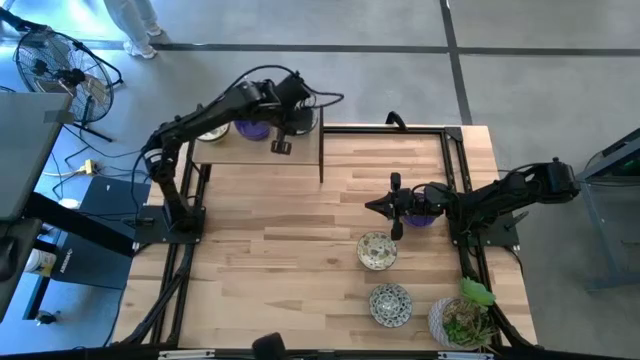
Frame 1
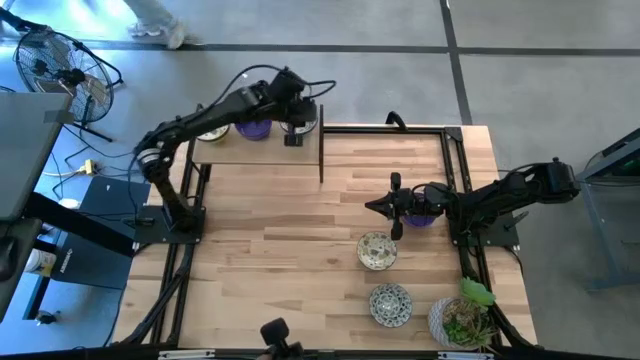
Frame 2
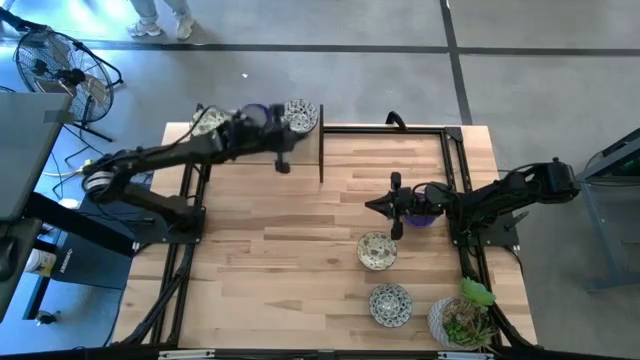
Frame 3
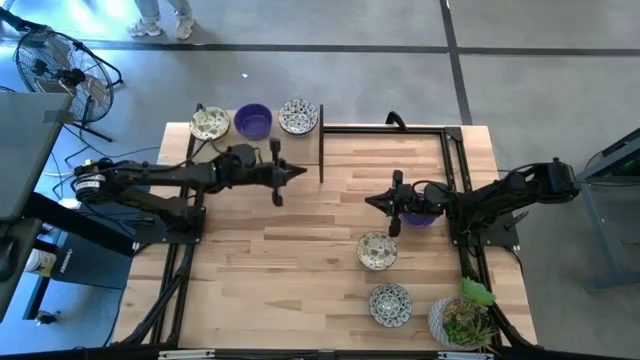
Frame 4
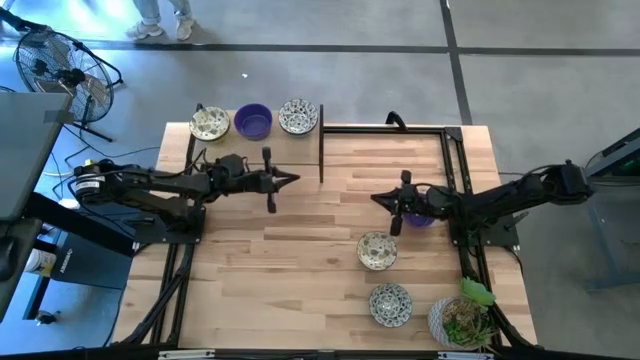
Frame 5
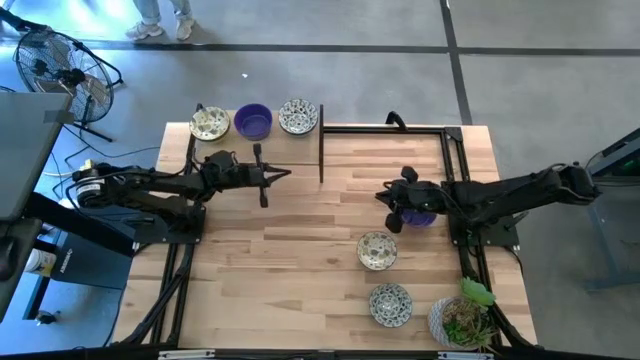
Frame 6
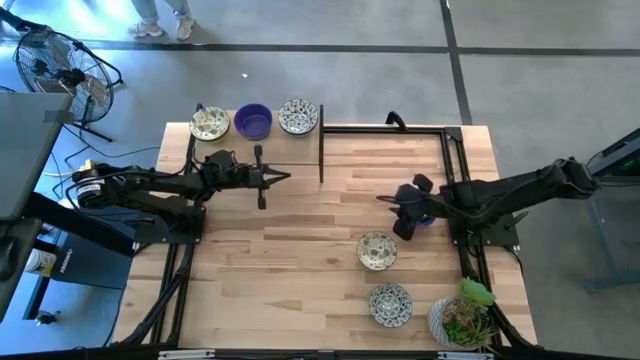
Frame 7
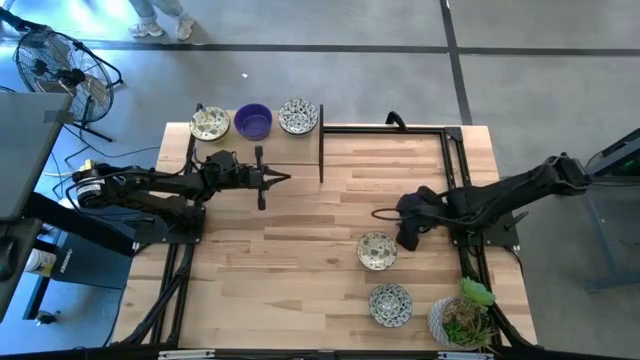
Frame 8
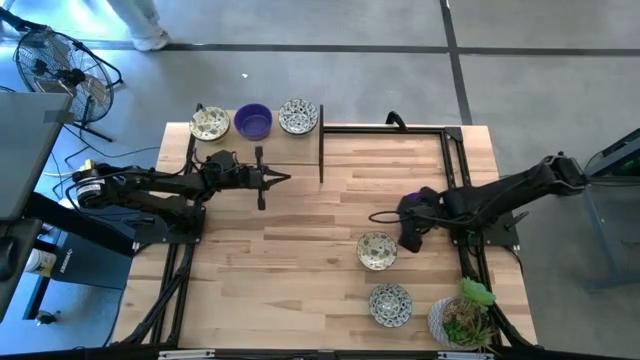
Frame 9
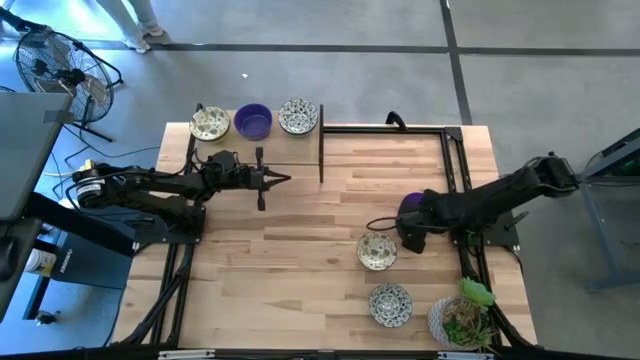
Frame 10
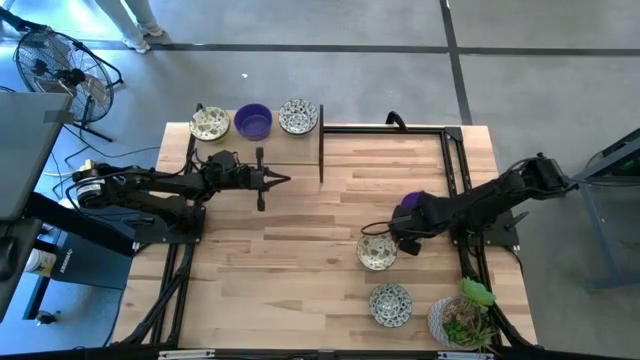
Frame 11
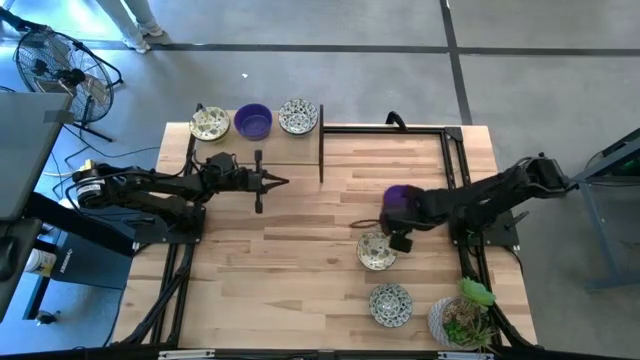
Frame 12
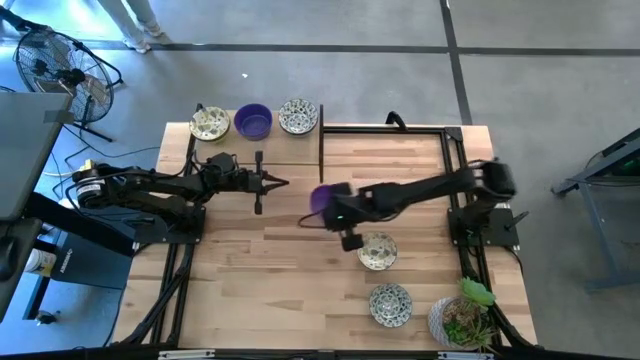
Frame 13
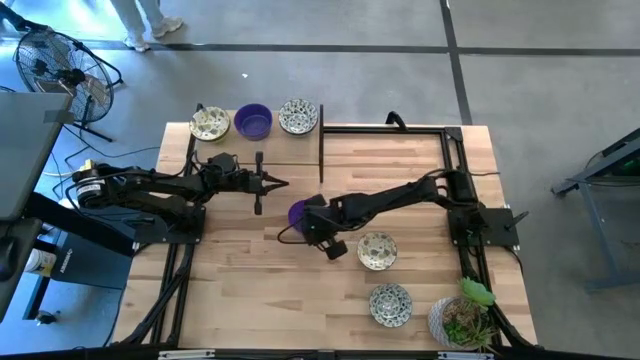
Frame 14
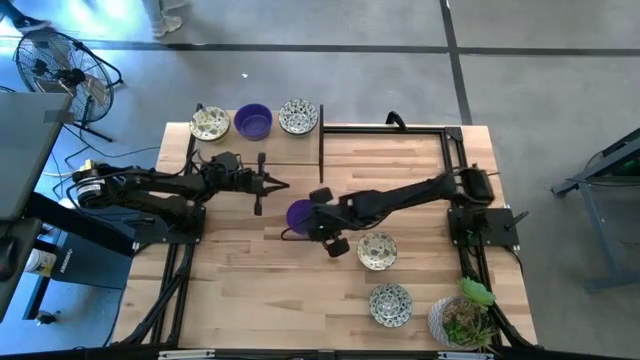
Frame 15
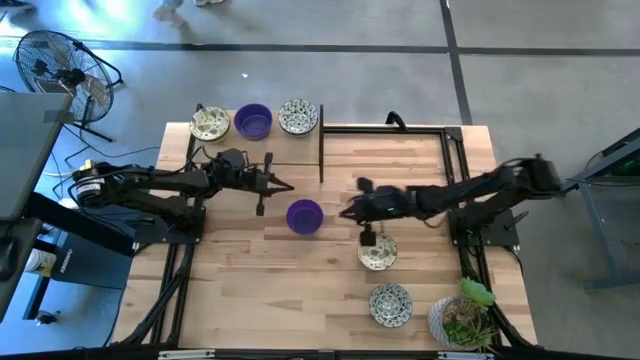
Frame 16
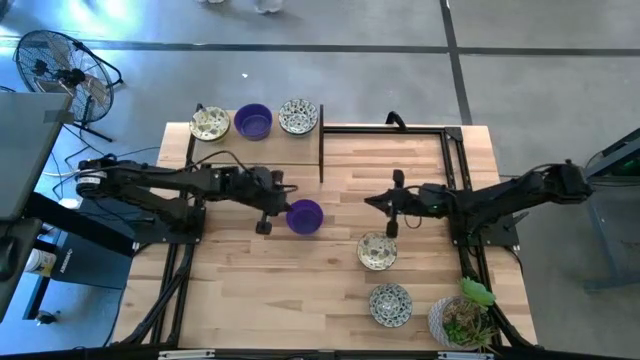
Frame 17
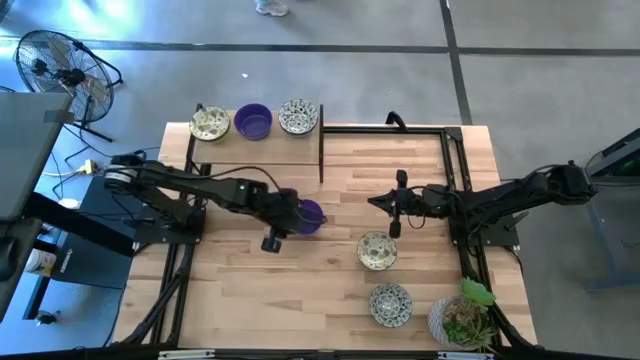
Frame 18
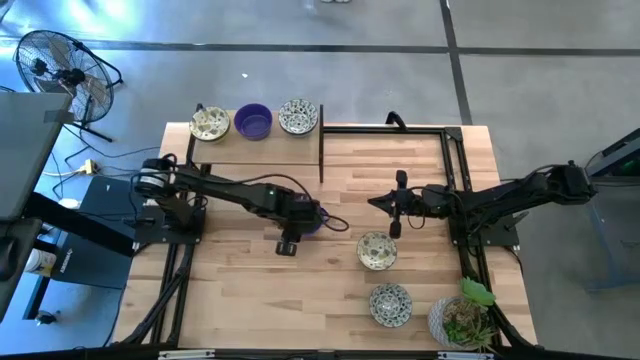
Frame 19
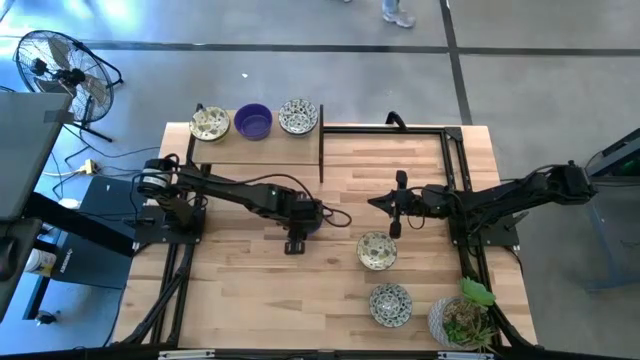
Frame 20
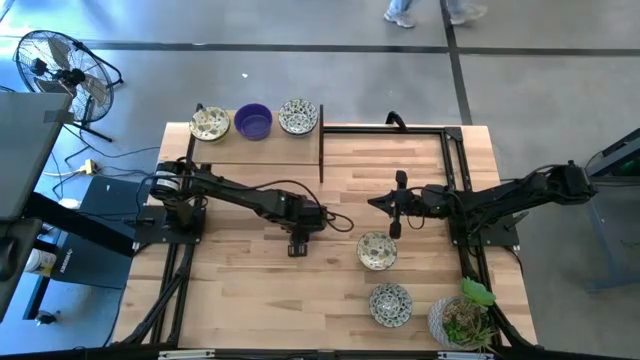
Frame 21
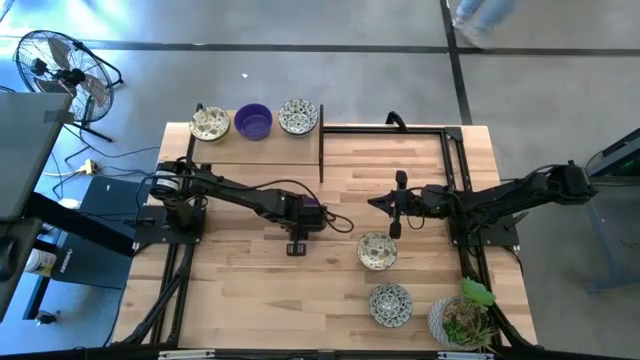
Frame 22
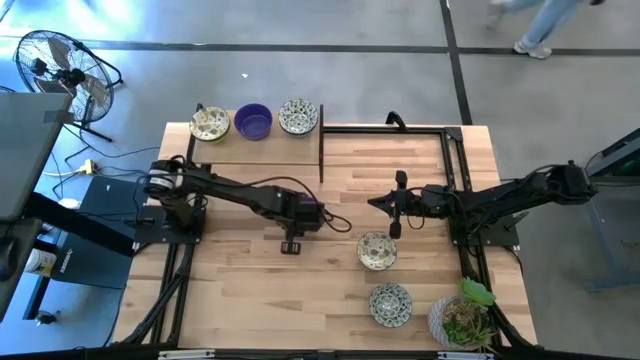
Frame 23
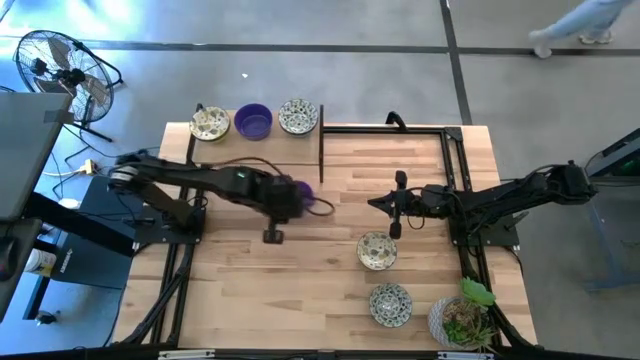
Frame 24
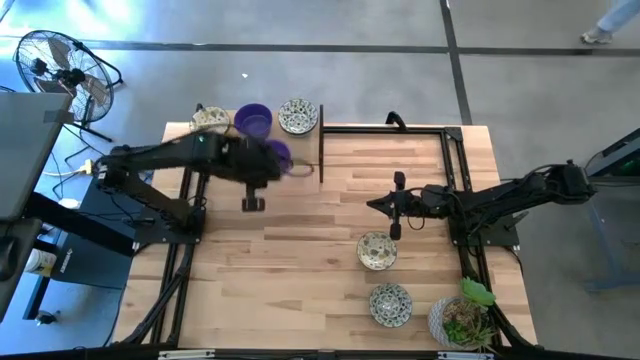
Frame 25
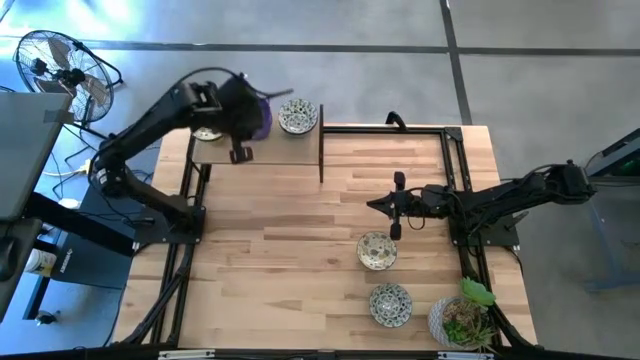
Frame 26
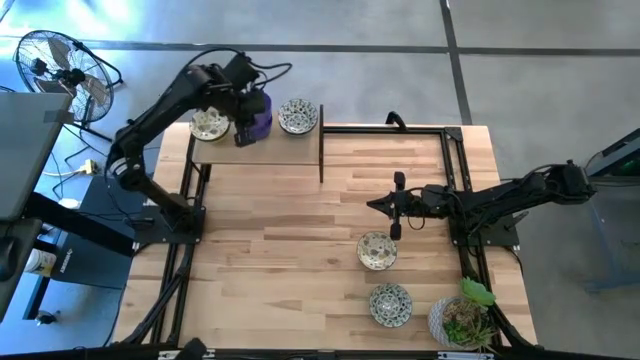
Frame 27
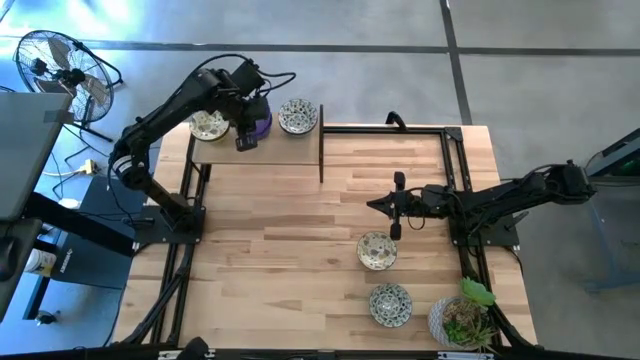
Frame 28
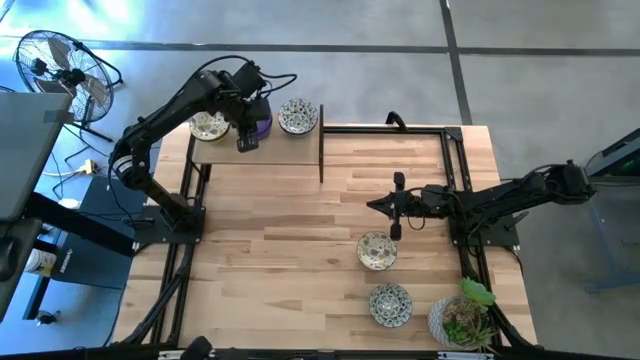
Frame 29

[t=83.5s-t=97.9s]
Task: Pick & Place Mini bowls
Stack the blue bowl on the stacked blue bowl on the shelf

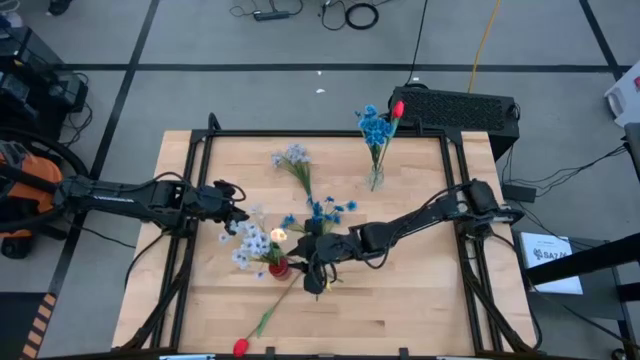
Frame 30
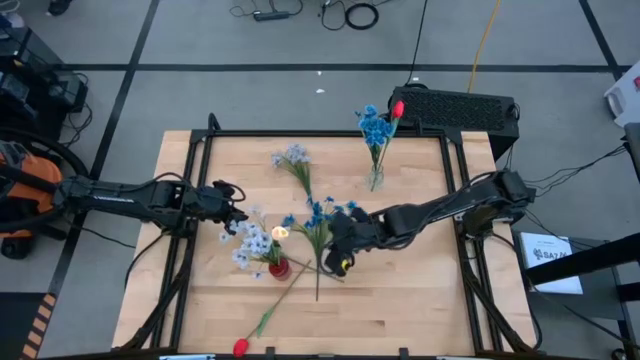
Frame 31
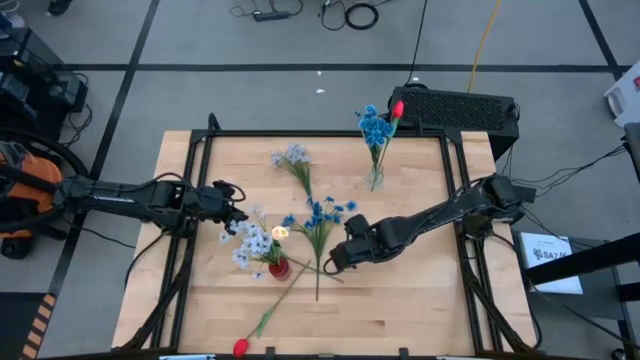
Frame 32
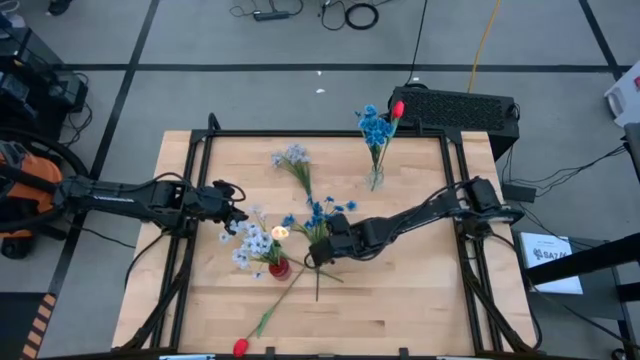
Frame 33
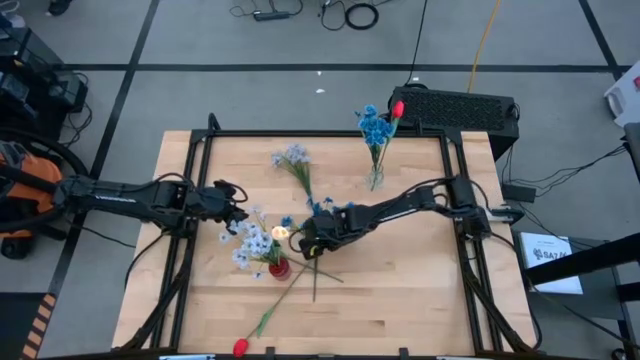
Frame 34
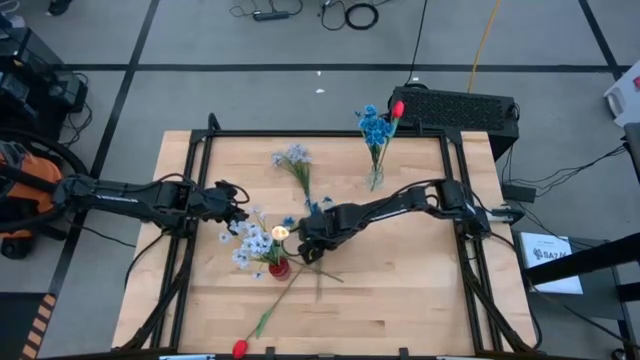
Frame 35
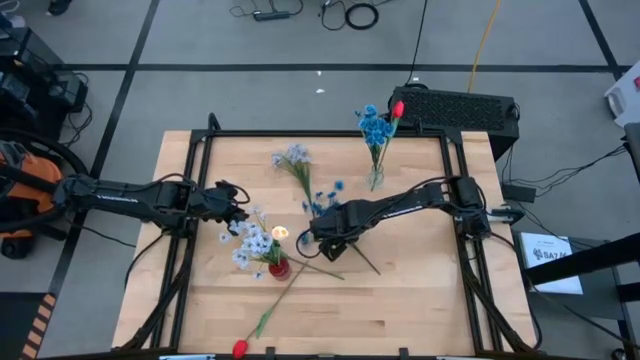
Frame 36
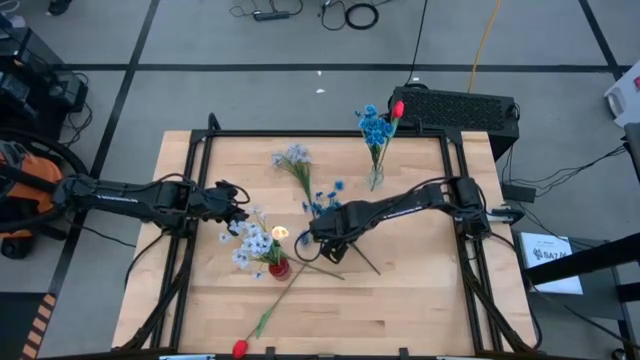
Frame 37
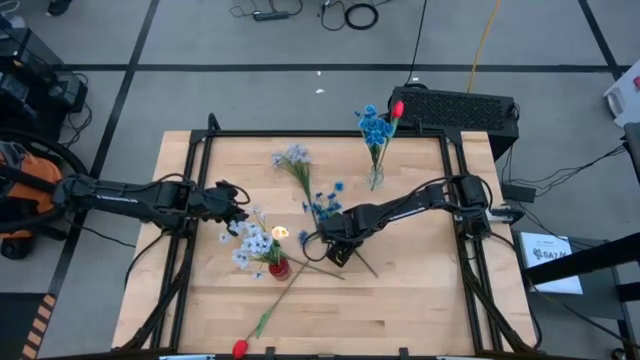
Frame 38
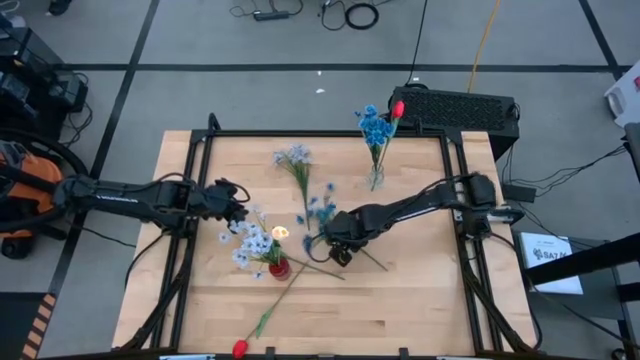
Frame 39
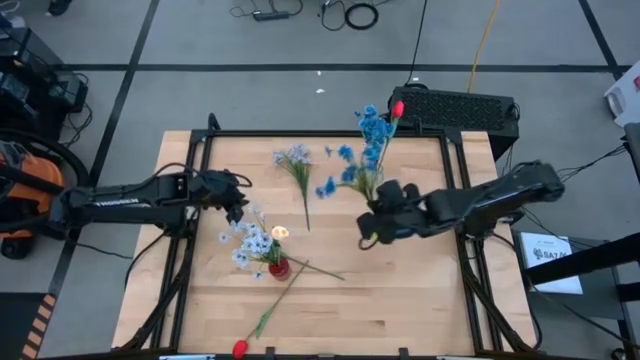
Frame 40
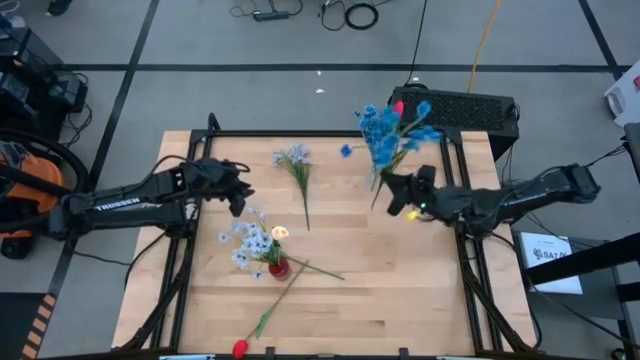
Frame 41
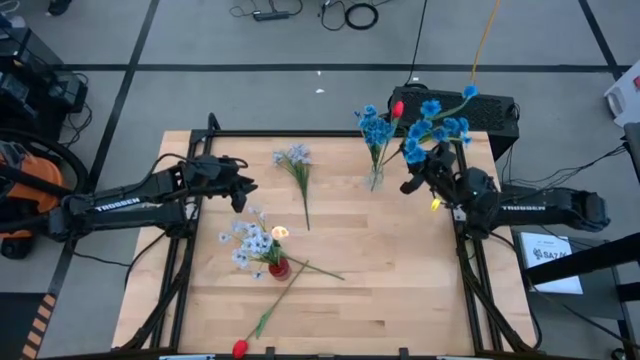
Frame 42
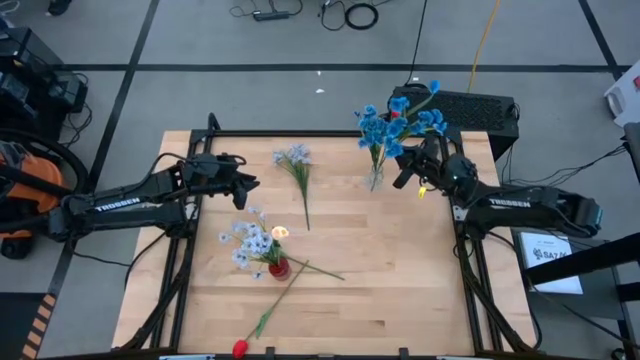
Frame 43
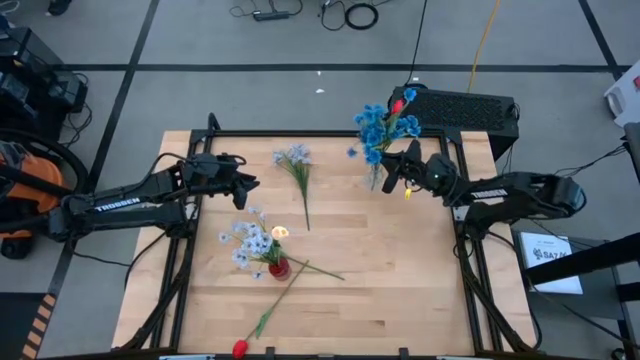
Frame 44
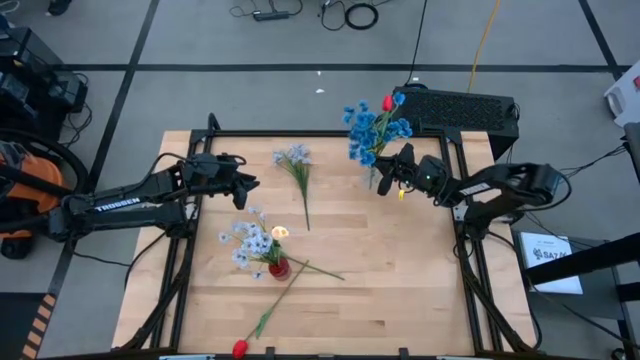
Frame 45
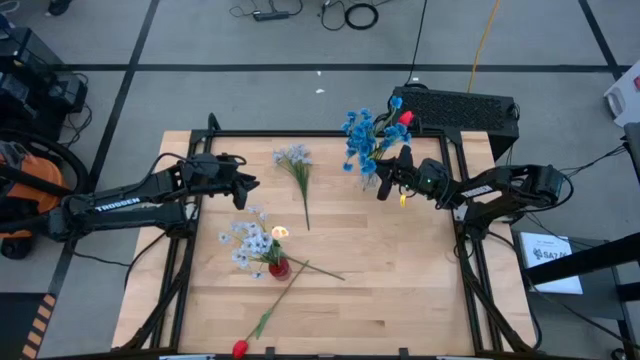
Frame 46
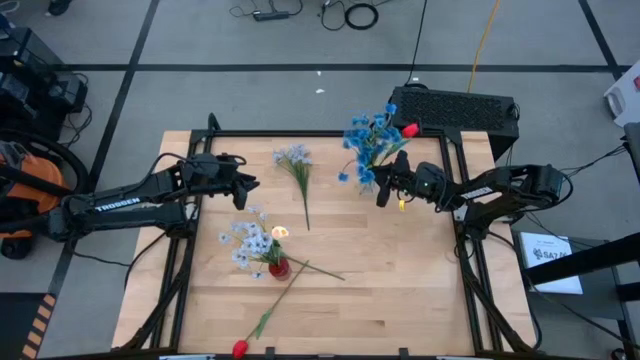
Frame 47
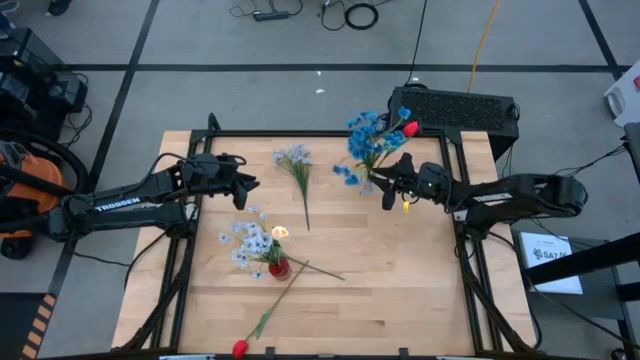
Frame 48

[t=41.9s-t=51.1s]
Task: Sort flowers into vase by color
Put the blue flower into the transparent vase
